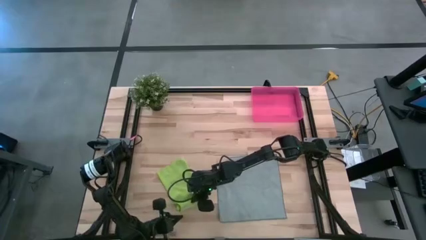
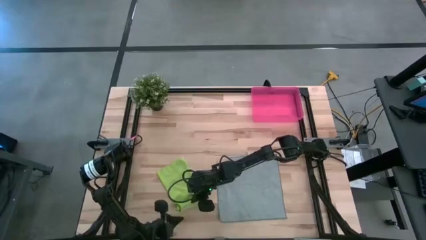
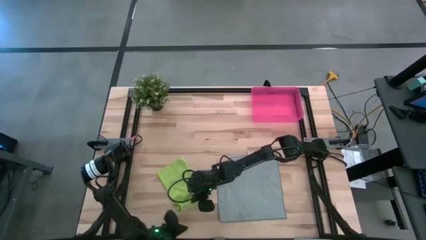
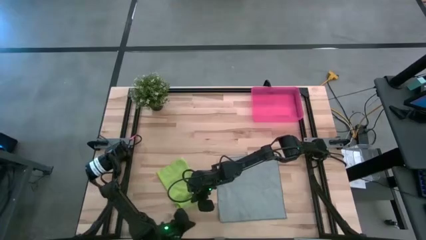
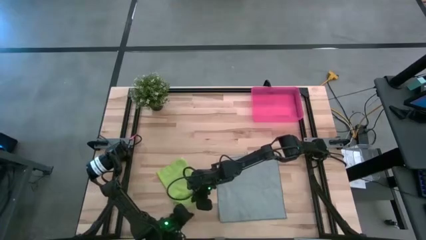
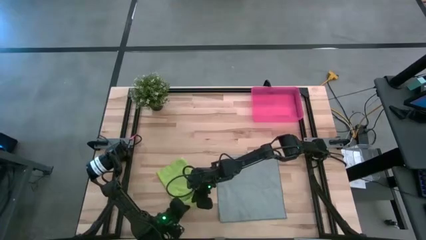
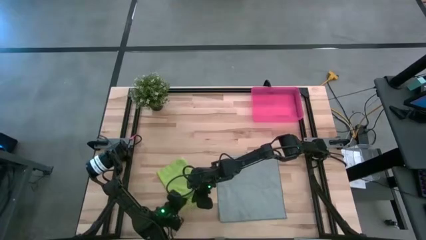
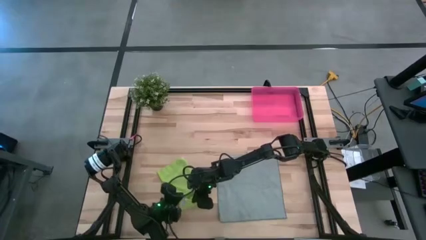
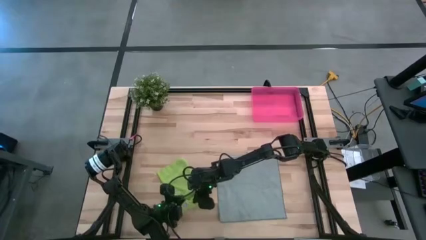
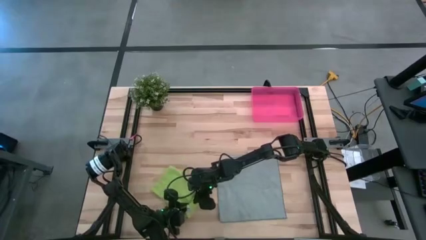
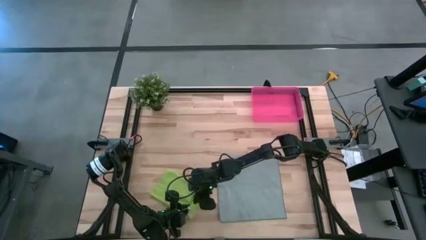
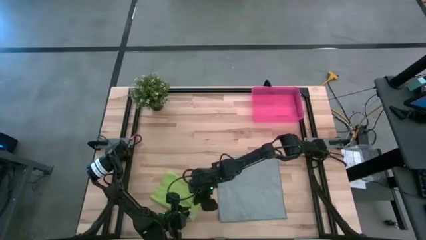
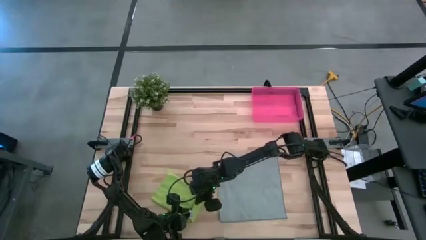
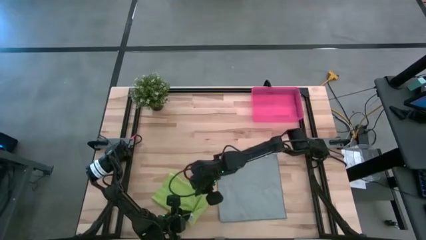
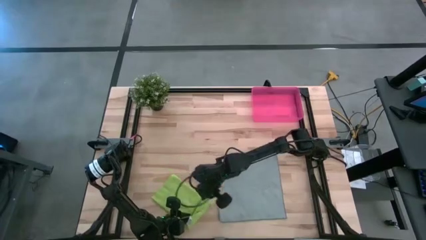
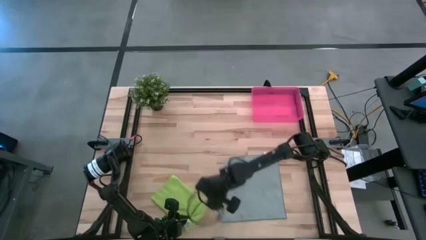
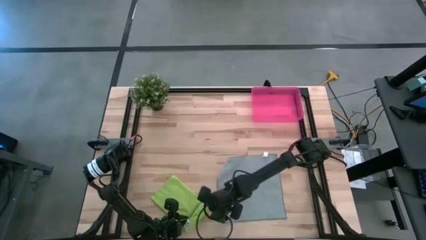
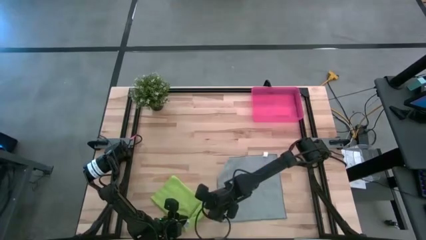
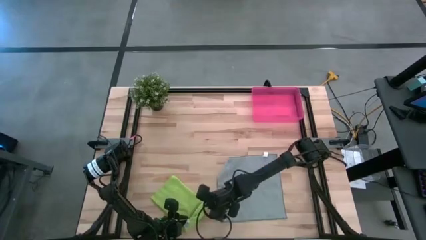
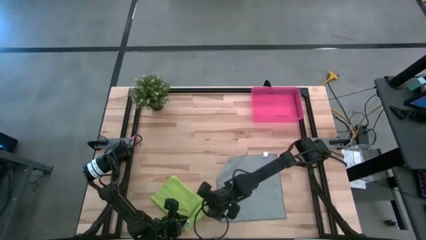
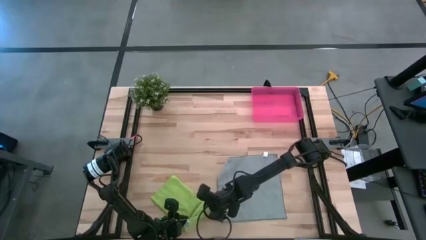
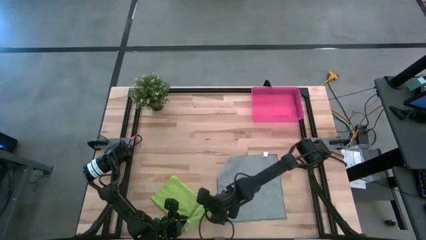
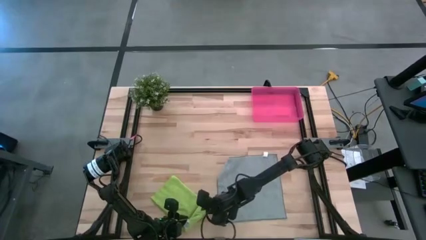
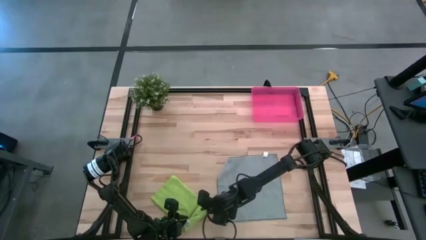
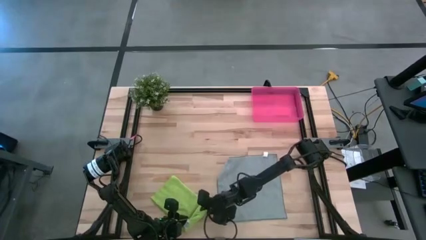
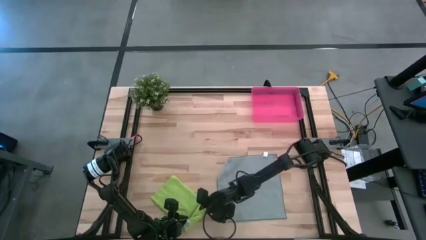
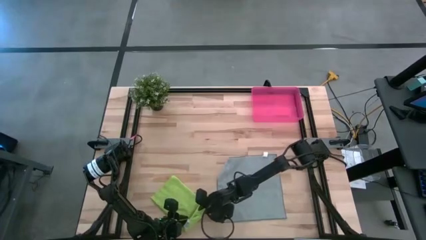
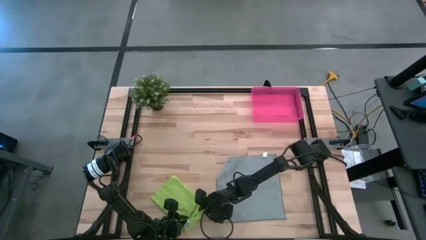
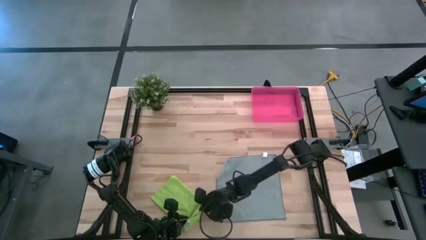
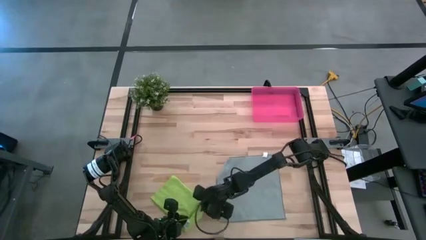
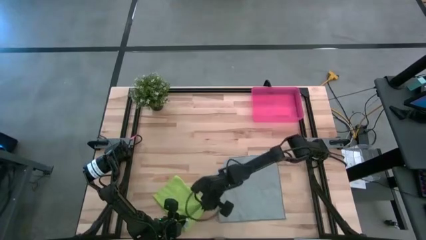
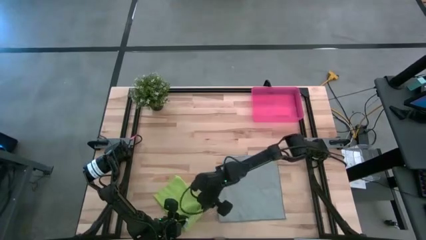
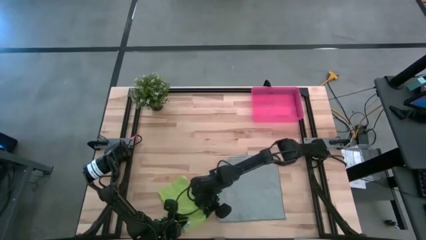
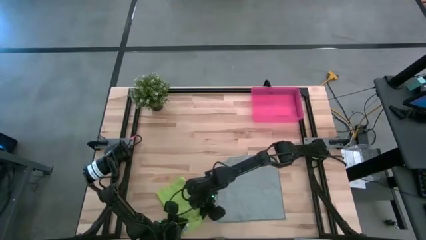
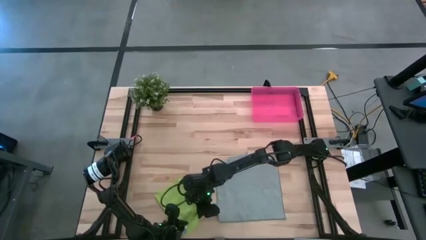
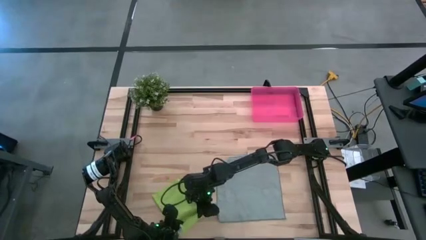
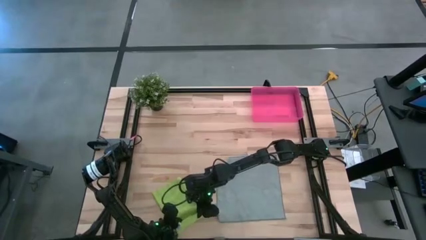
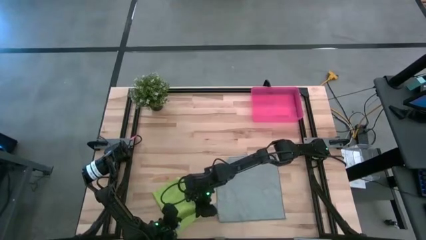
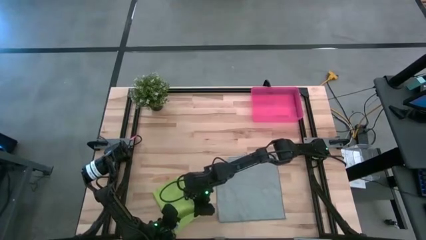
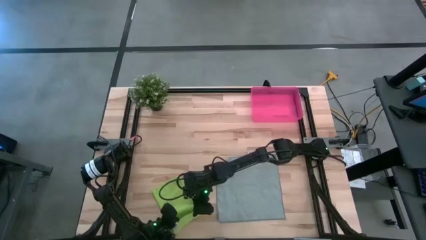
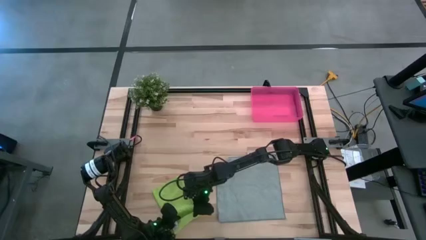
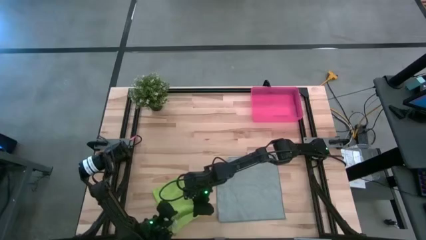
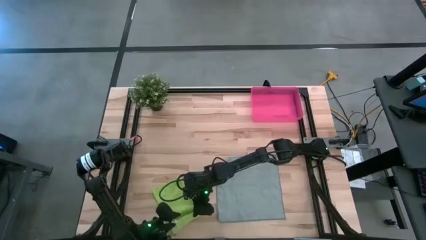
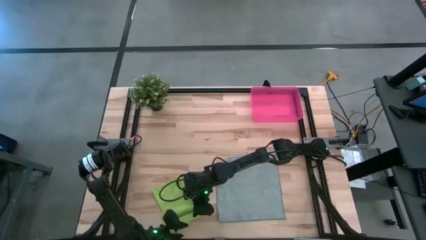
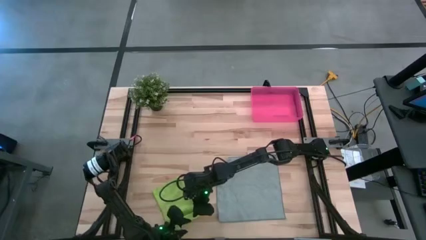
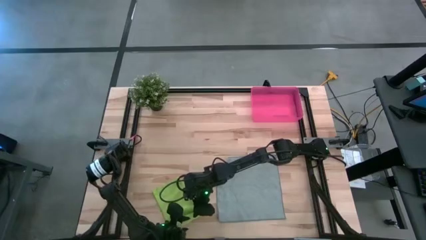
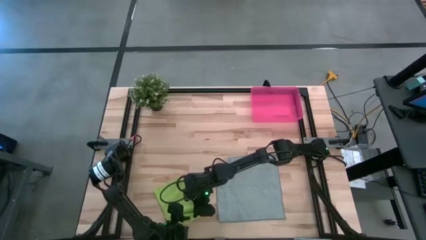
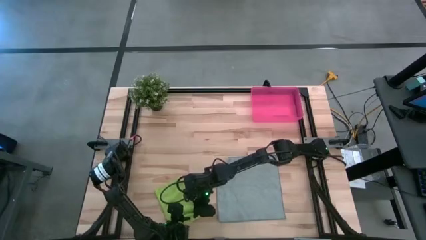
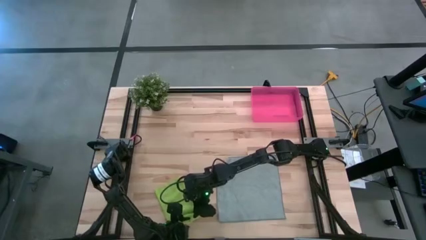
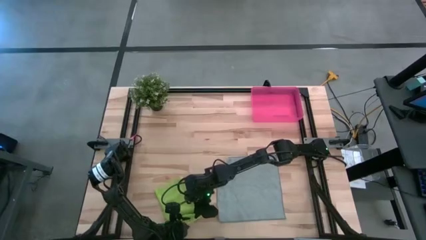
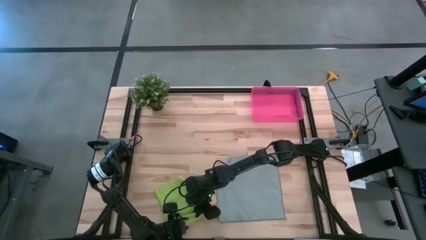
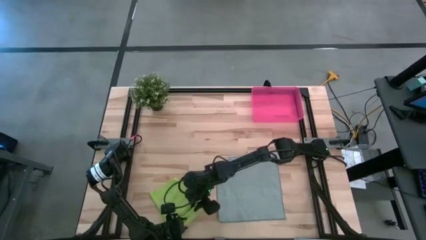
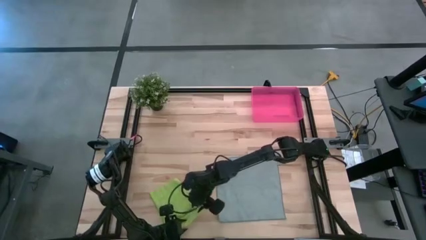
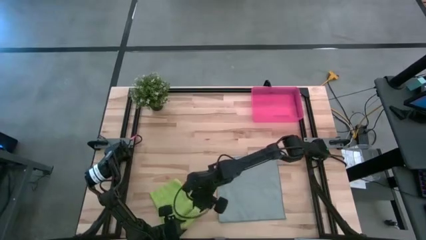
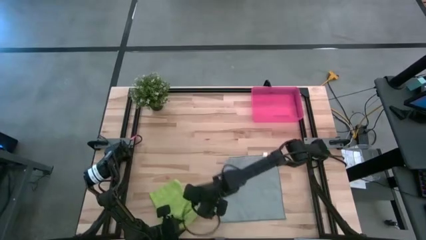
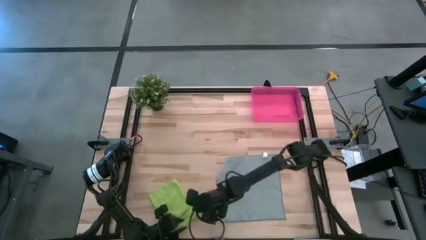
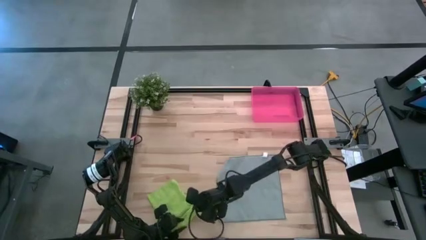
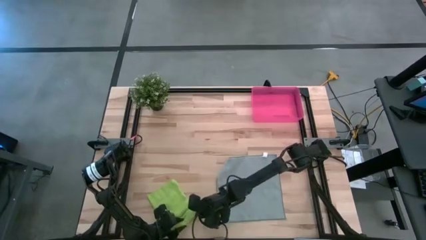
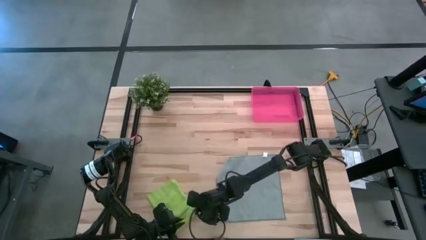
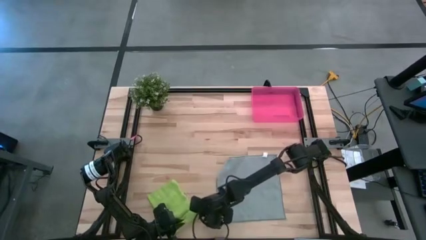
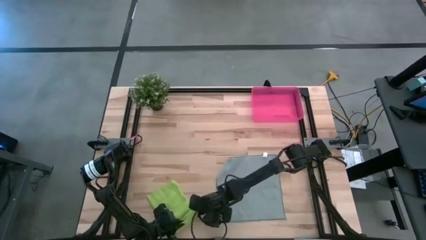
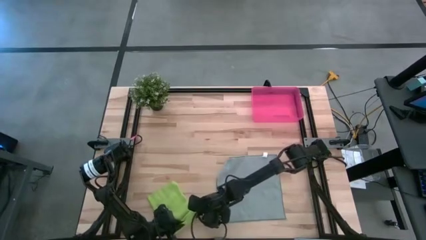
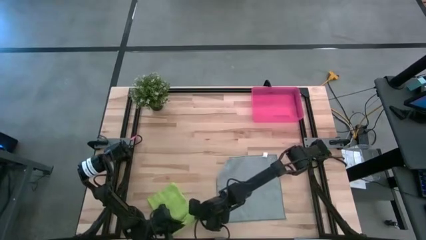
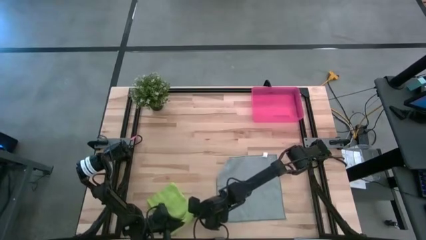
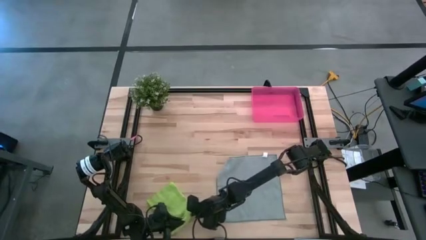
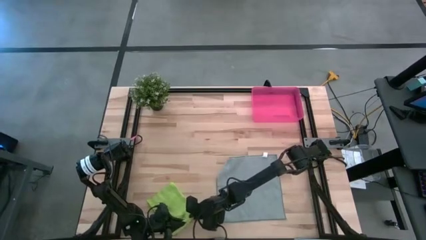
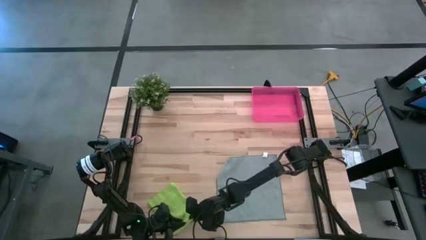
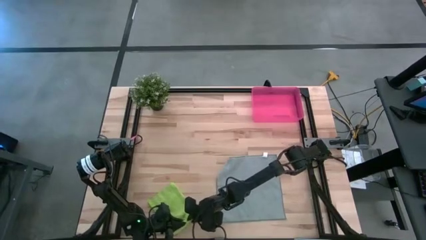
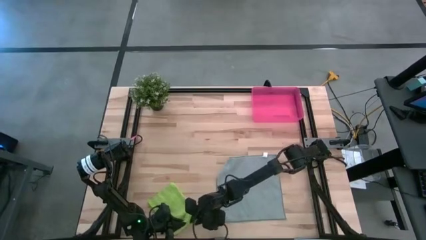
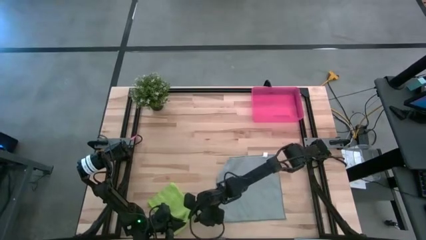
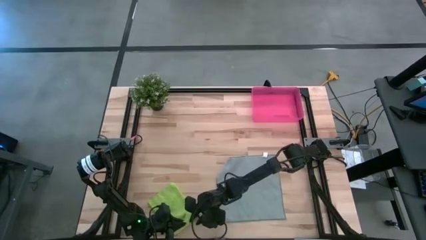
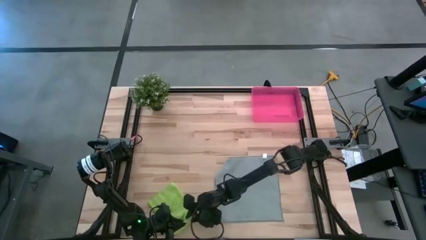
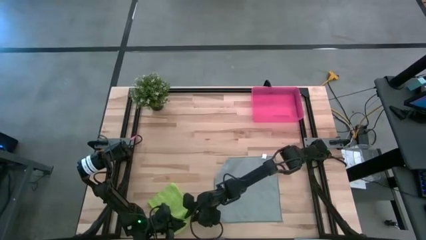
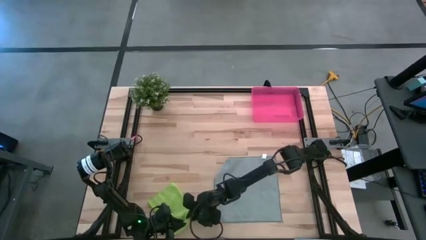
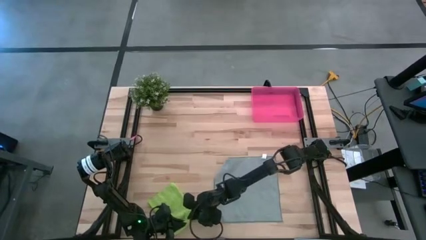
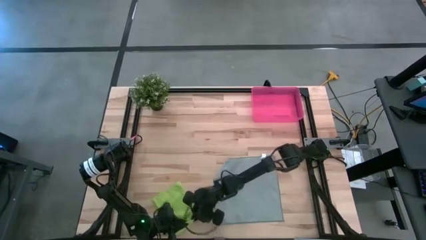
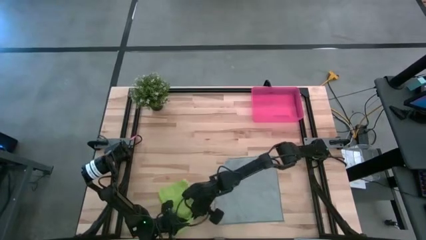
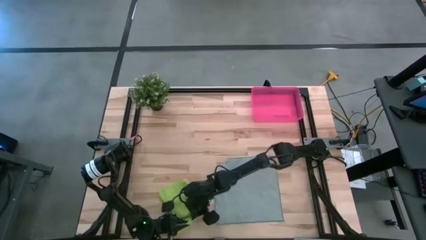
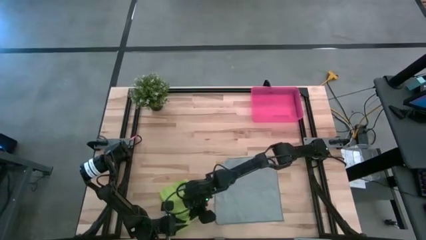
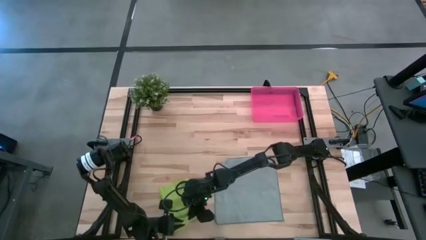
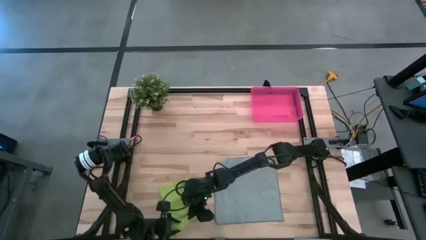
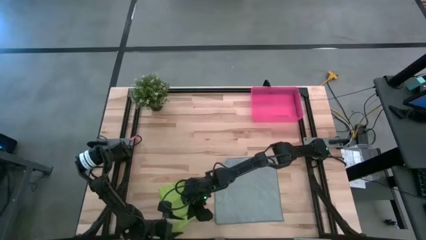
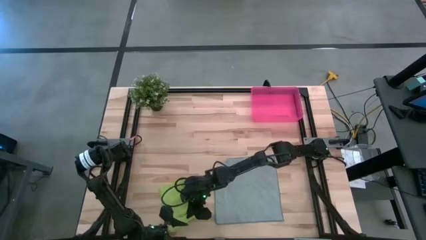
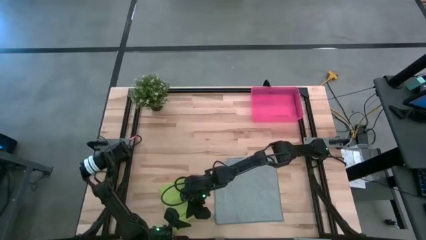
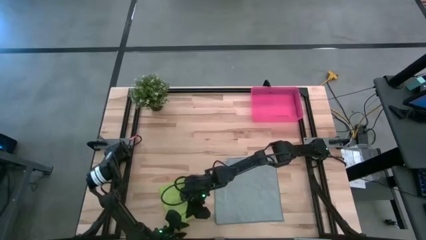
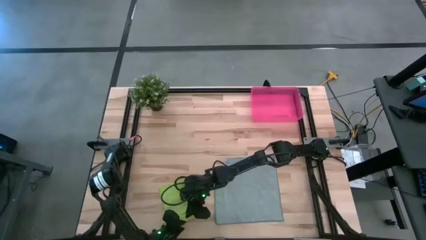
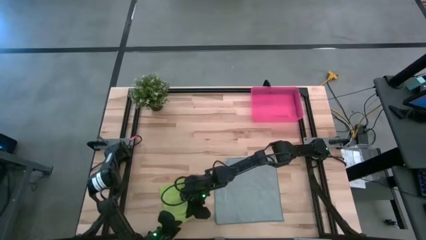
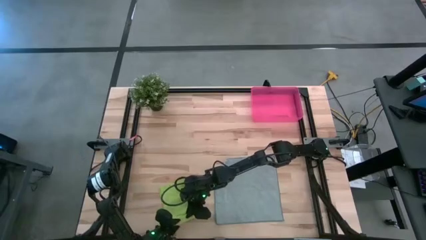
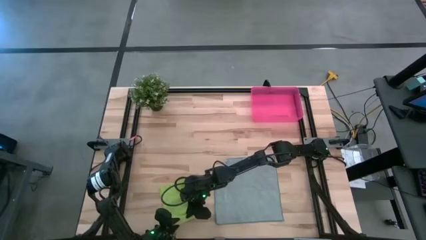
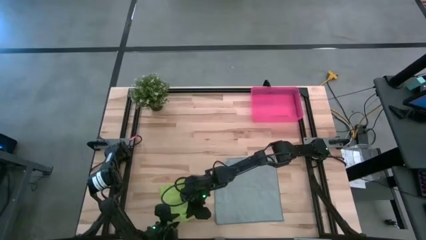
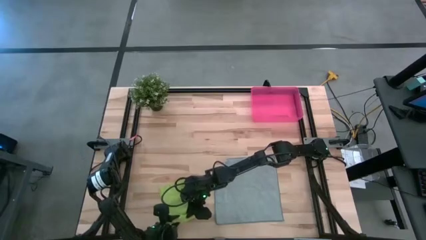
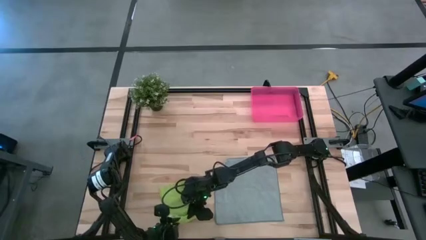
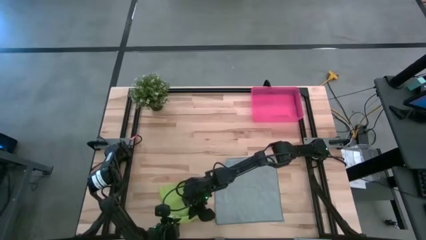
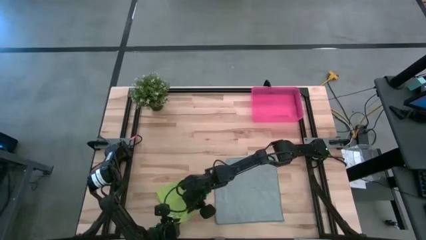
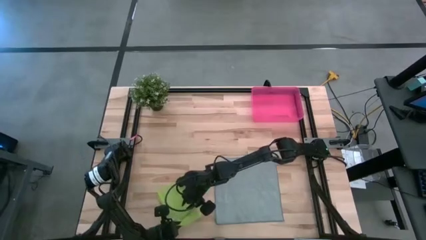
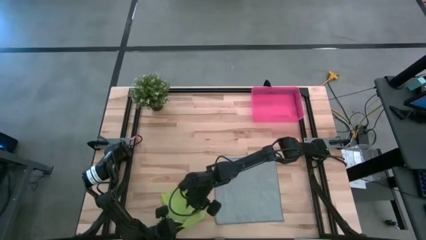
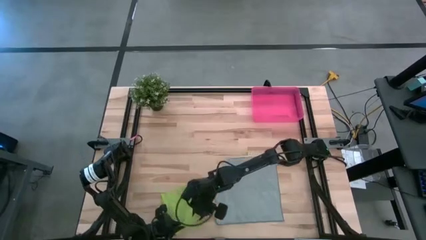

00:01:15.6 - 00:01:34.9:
Task: Roll microfiber towels into tight, uniform cylinder then place into a basket
Roll the green microfiber cloth
